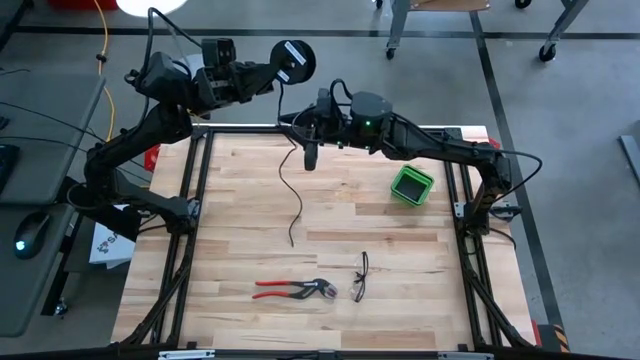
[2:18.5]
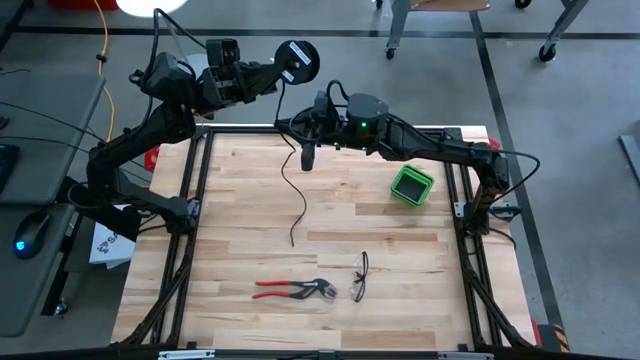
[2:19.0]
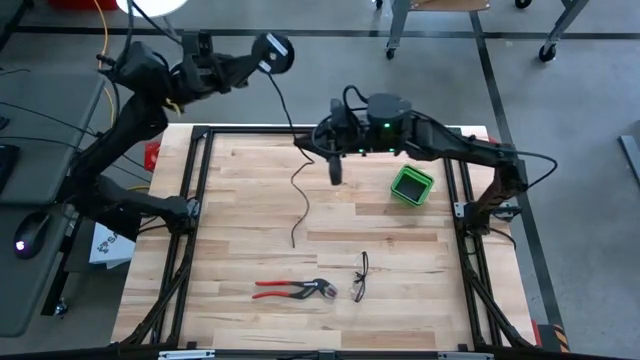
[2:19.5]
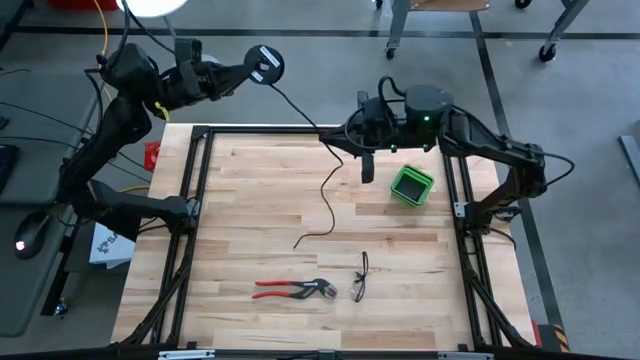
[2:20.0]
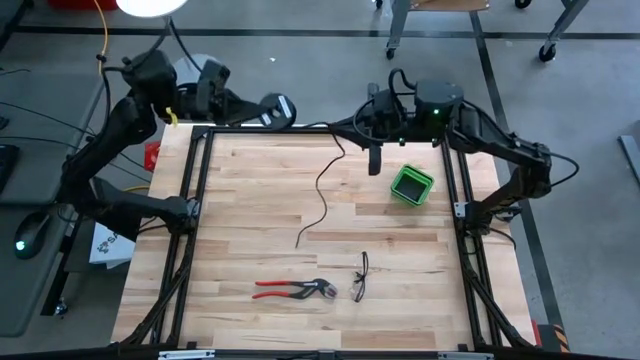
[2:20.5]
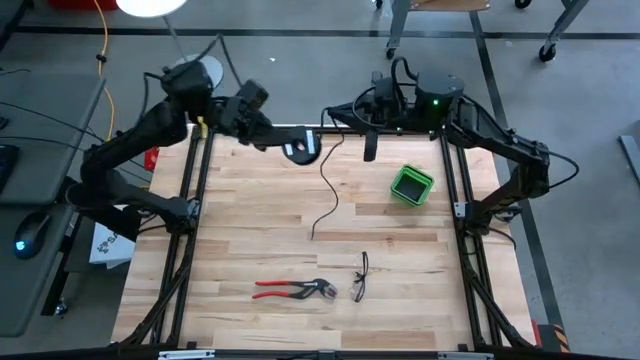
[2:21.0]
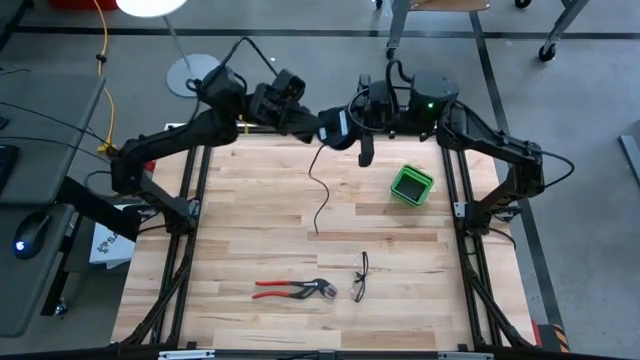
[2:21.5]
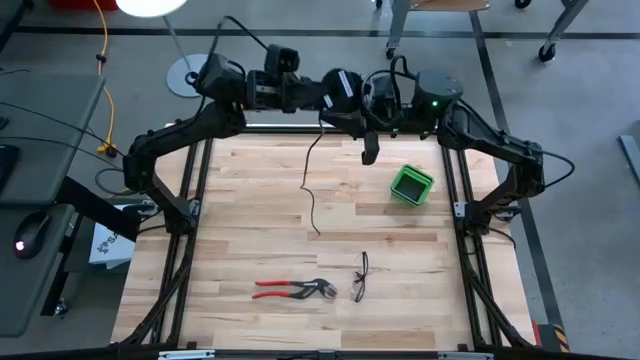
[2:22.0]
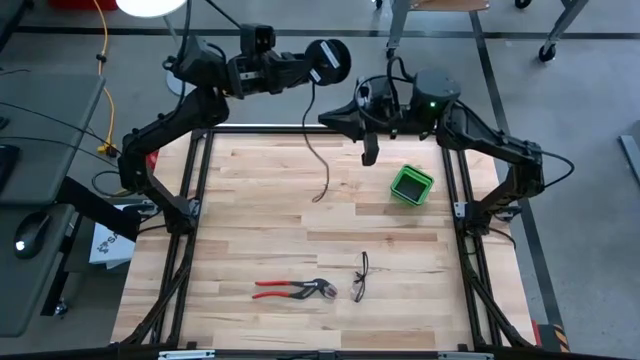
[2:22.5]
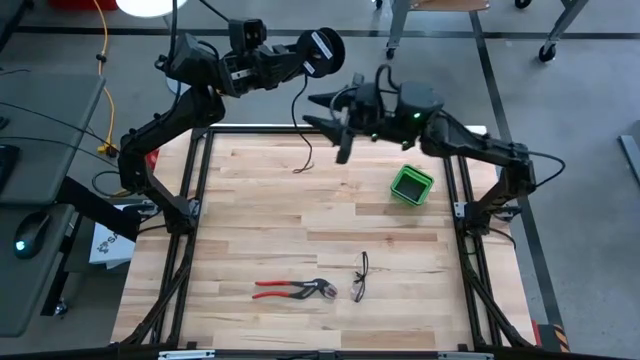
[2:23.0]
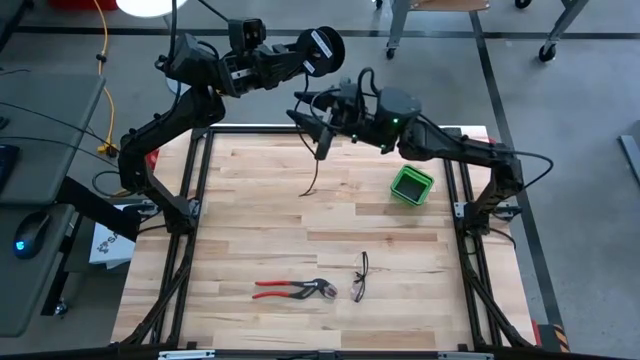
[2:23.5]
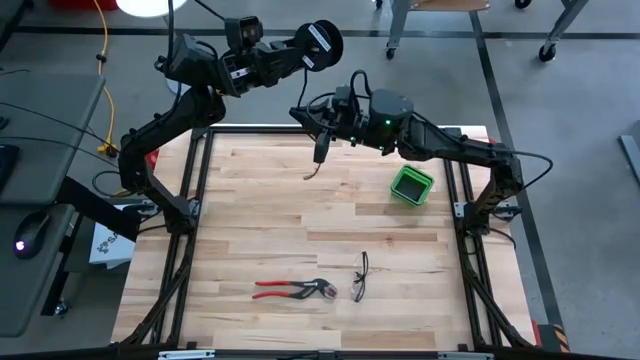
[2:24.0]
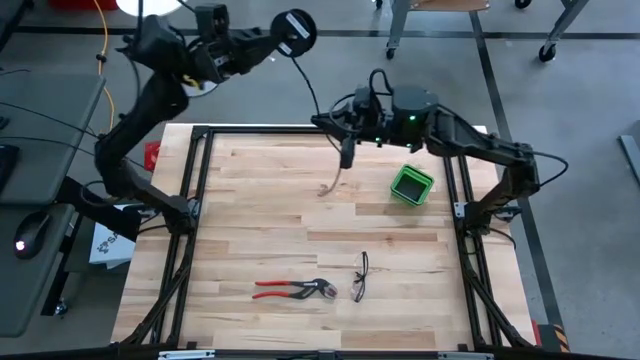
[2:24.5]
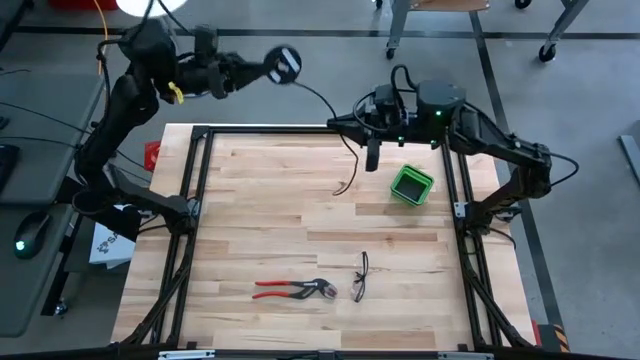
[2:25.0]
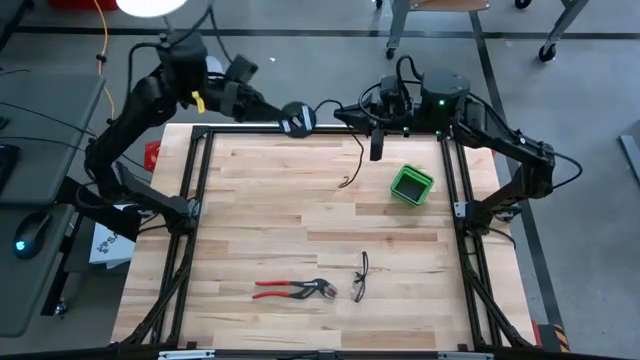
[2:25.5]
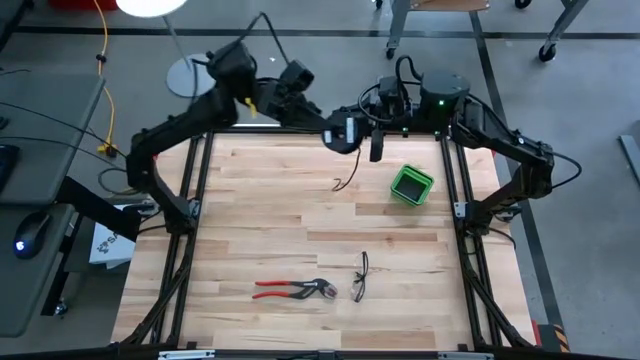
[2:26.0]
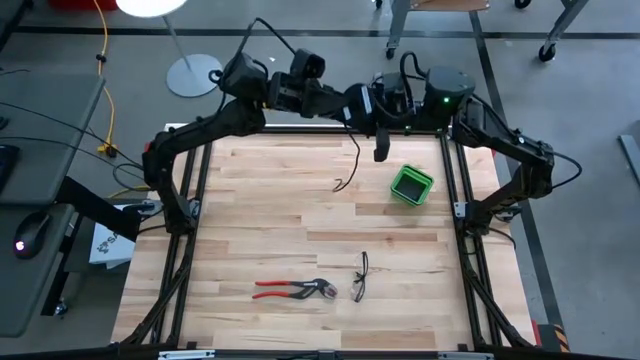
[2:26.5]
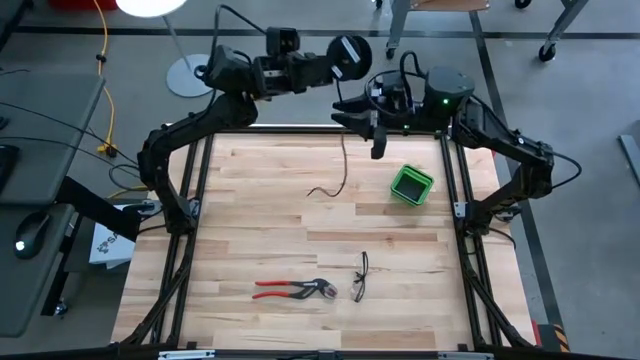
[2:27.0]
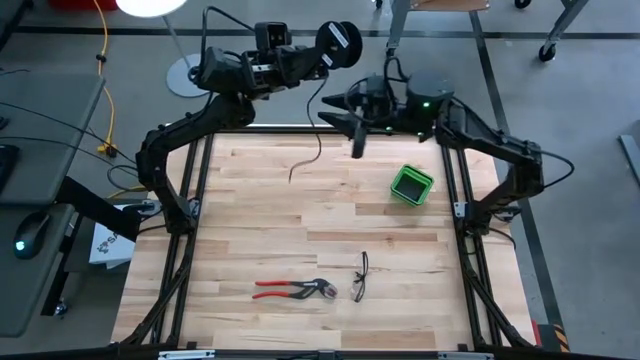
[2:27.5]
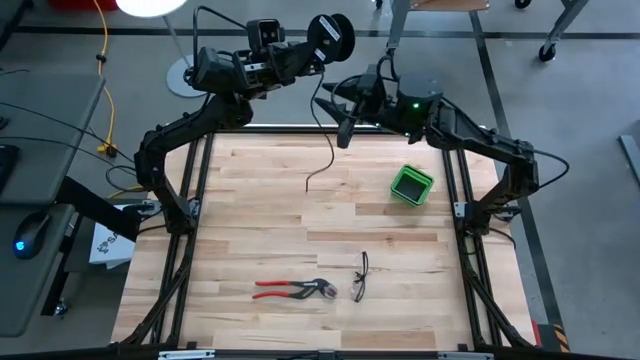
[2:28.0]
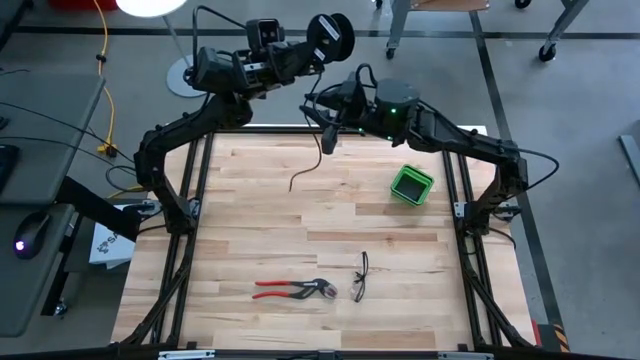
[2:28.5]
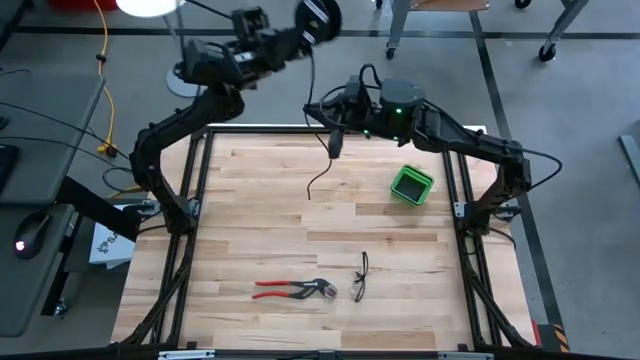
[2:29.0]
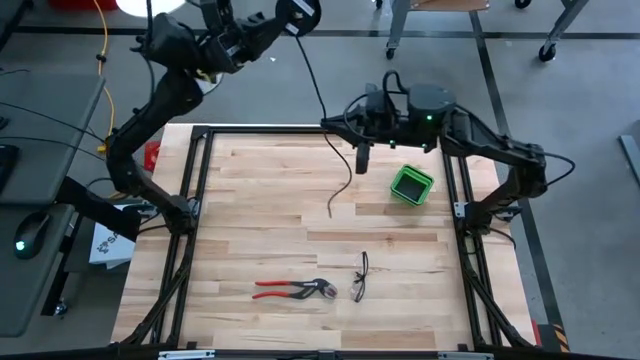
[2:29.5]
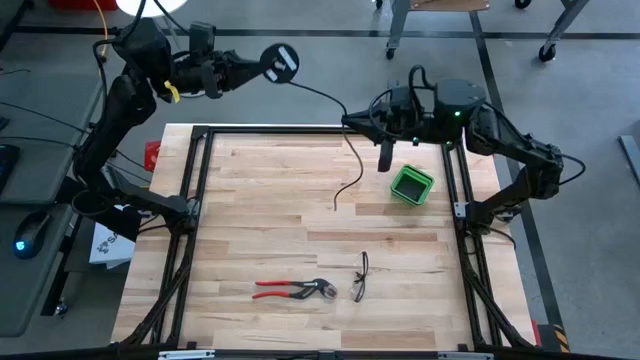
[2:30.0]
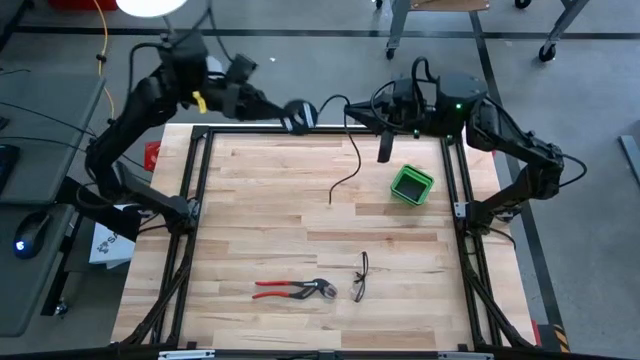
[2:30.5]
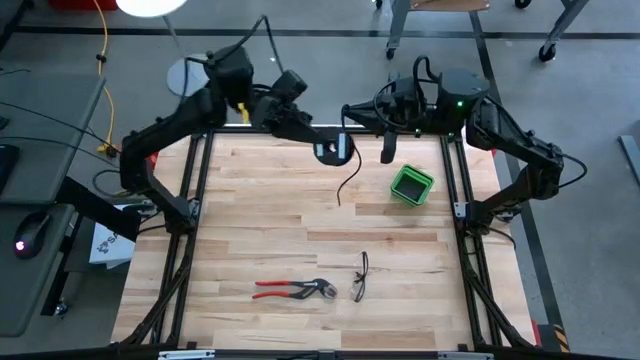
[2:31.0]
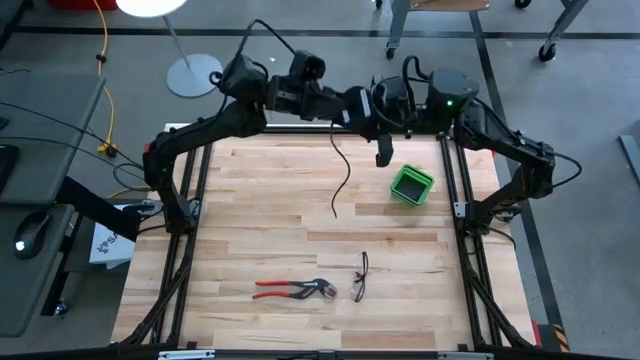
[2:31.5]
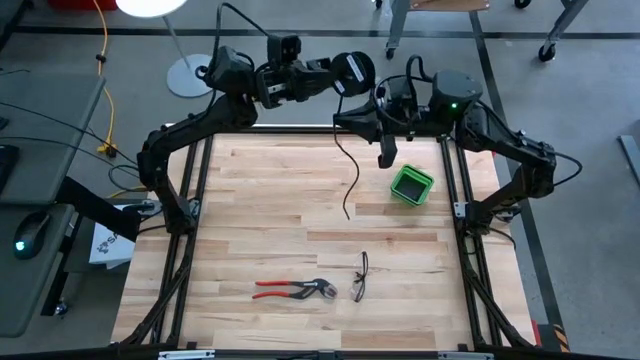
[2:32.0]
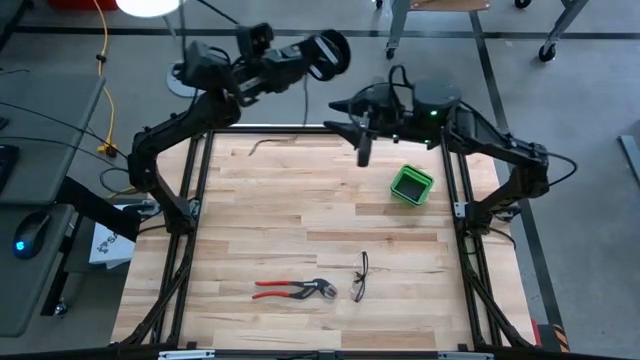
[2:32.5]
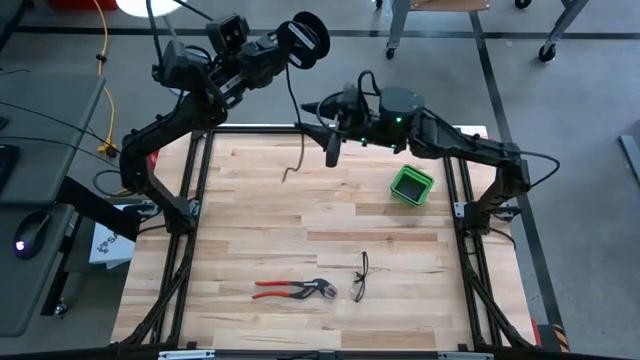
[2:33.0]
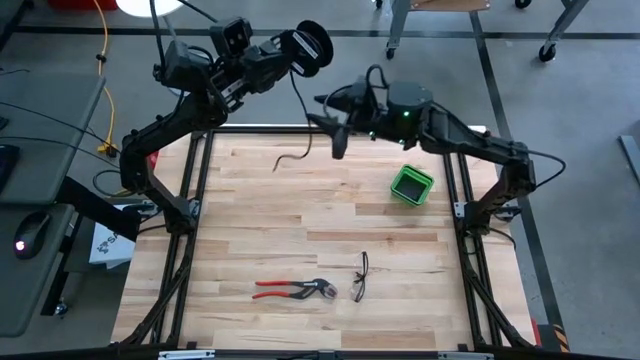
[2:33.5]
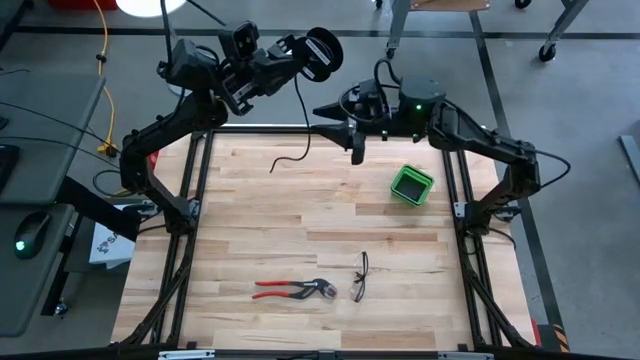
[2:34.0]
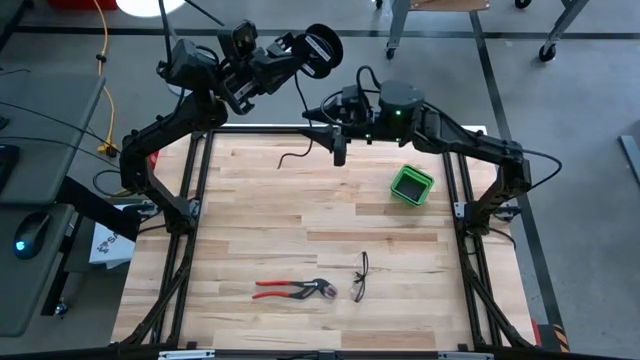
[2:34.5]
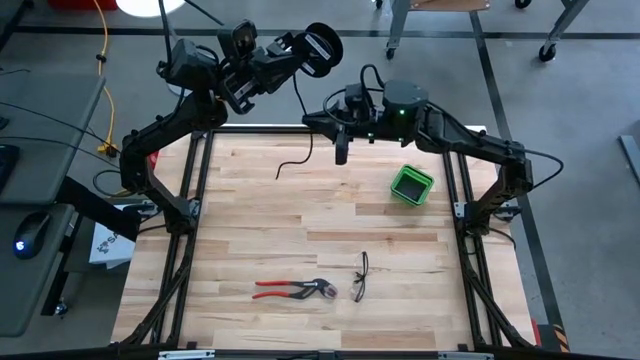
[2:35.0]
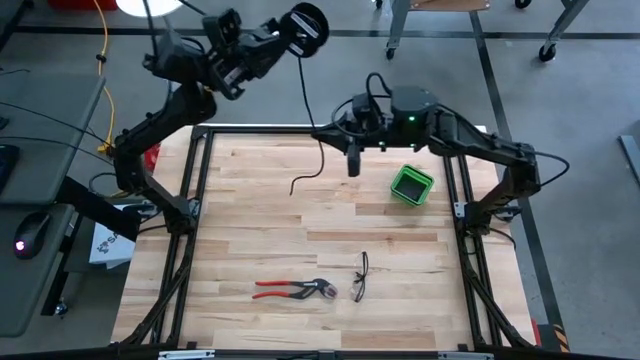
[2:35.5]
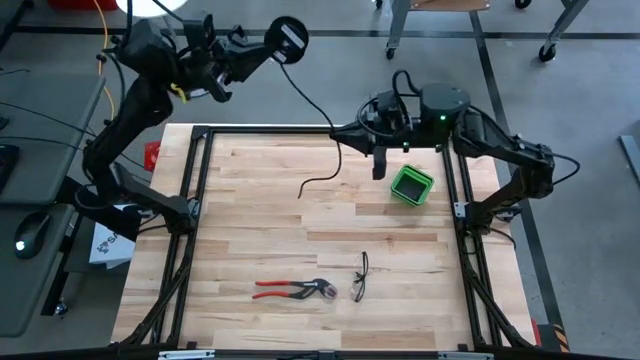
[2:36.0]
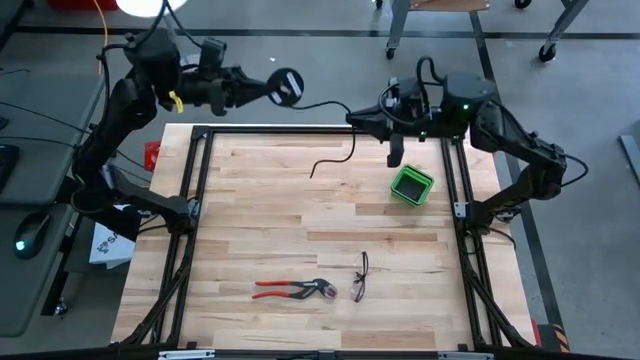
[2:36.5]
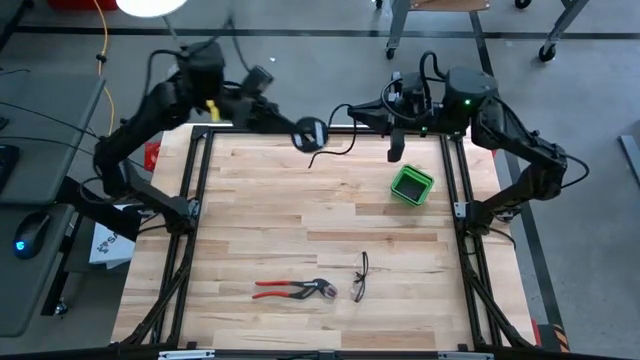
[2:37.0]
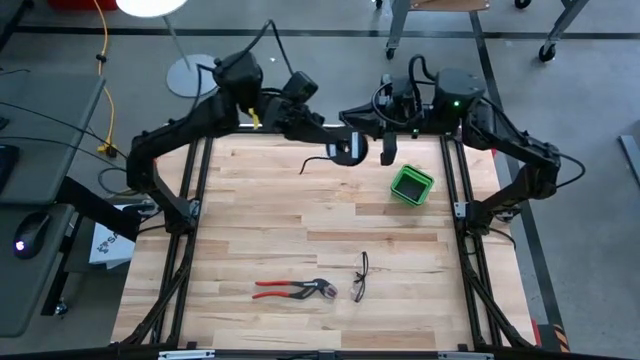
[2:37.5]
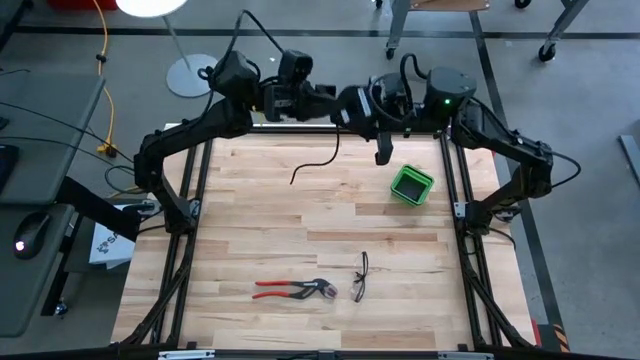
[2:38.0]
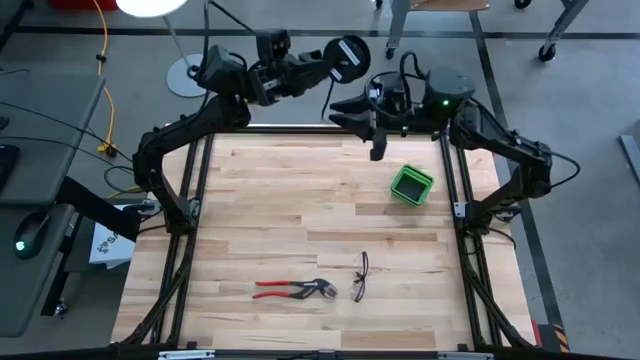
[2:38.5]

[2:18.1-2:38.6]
Task: Coil cords
Coil the black wire onto the black spool
